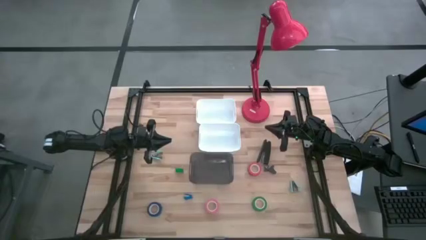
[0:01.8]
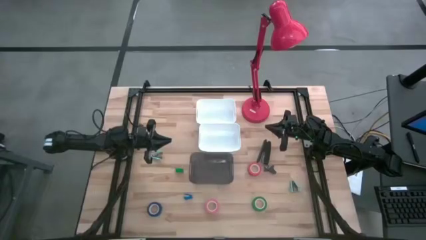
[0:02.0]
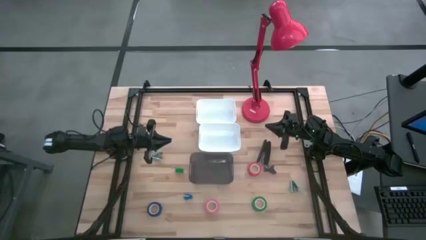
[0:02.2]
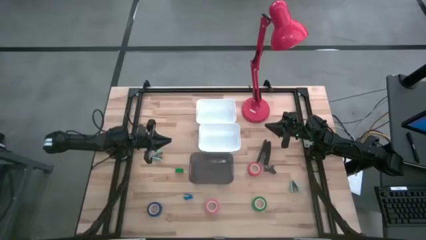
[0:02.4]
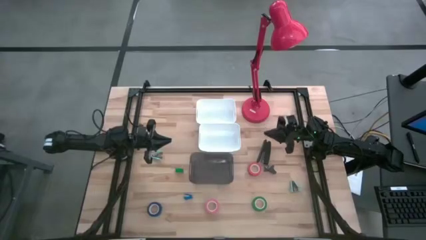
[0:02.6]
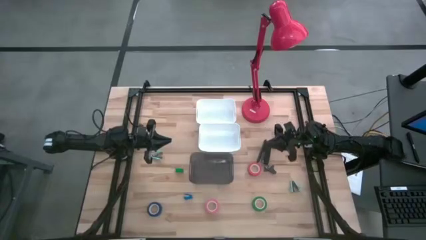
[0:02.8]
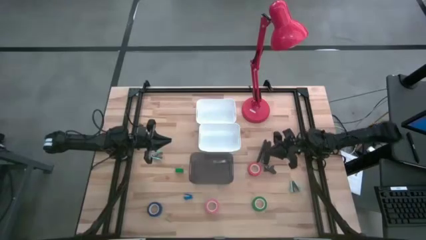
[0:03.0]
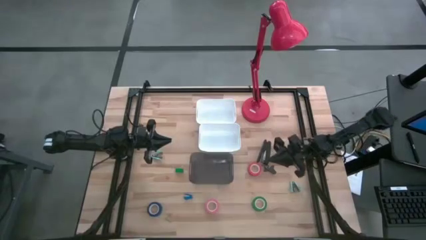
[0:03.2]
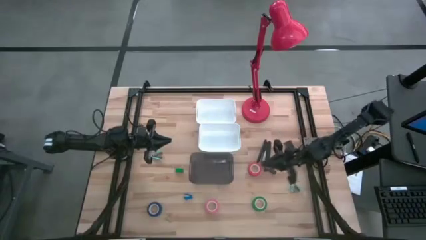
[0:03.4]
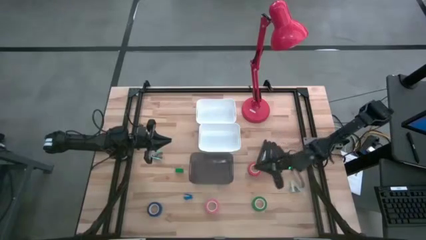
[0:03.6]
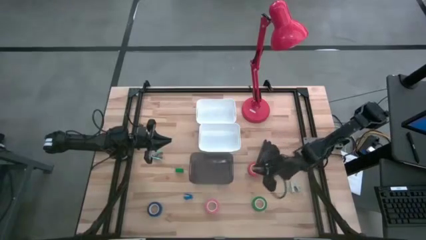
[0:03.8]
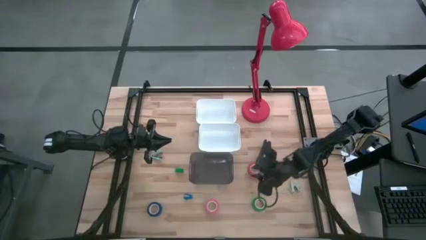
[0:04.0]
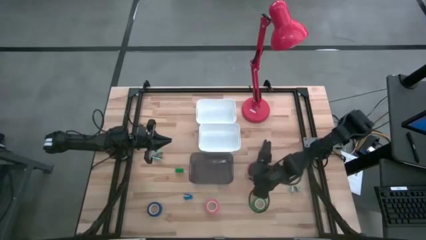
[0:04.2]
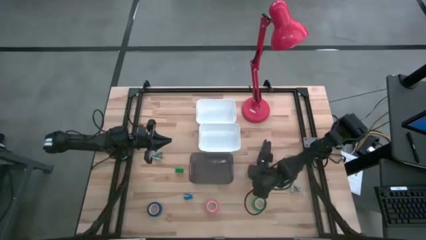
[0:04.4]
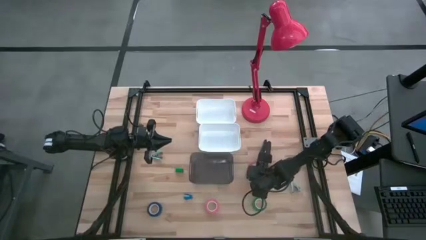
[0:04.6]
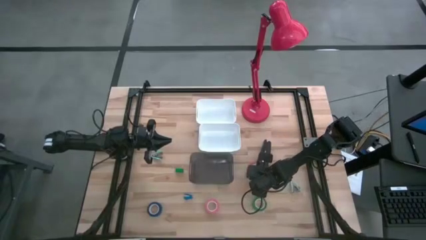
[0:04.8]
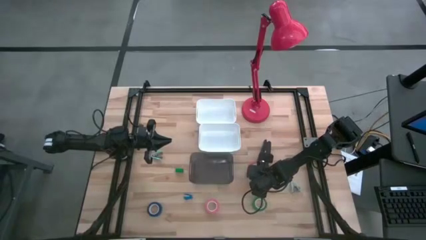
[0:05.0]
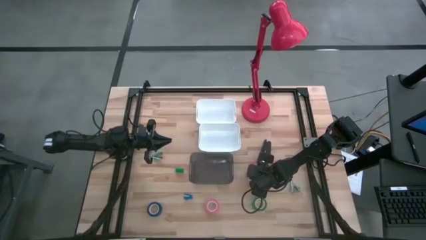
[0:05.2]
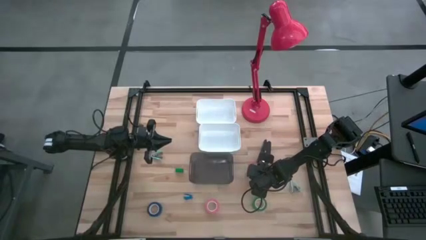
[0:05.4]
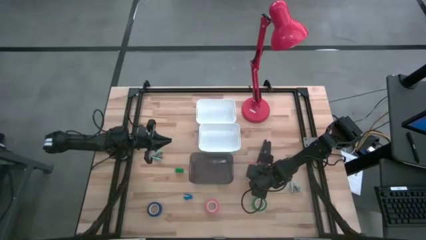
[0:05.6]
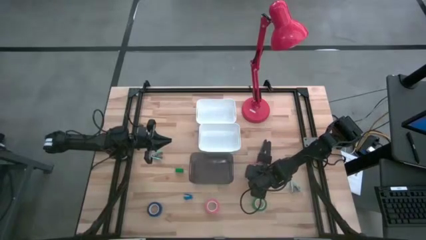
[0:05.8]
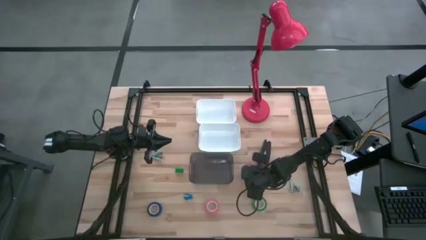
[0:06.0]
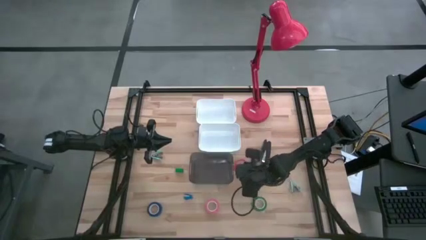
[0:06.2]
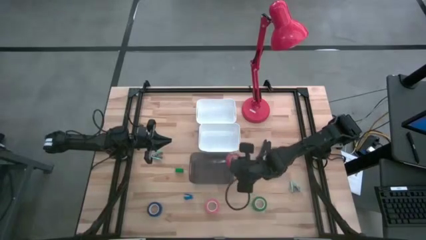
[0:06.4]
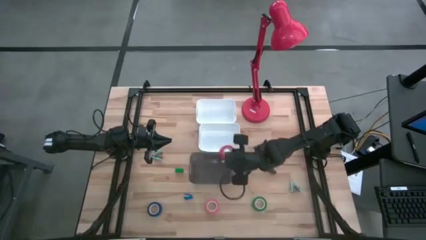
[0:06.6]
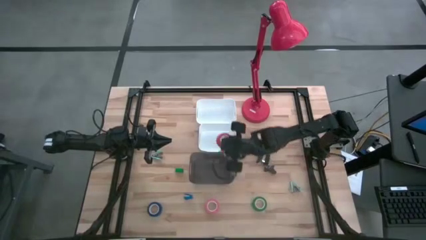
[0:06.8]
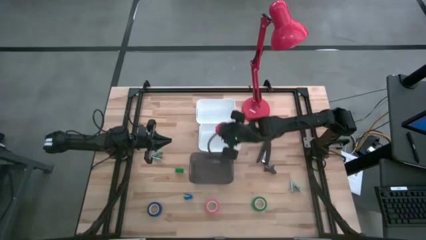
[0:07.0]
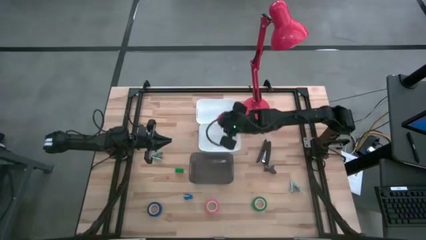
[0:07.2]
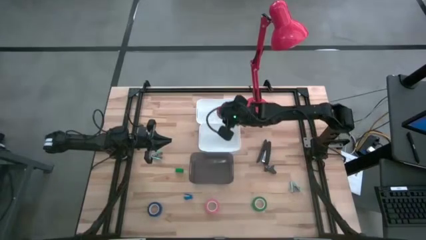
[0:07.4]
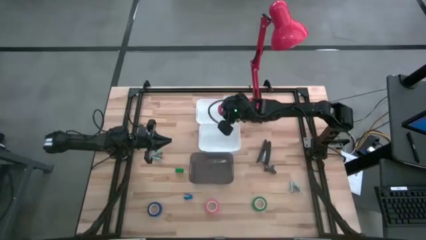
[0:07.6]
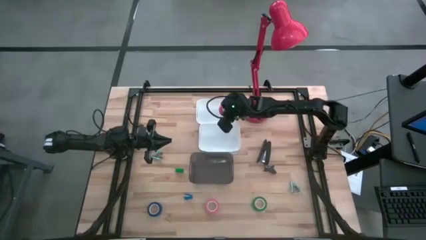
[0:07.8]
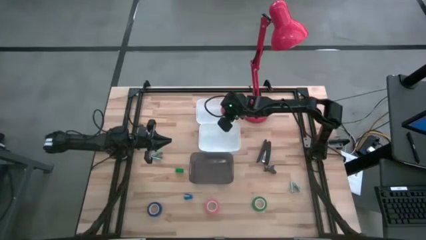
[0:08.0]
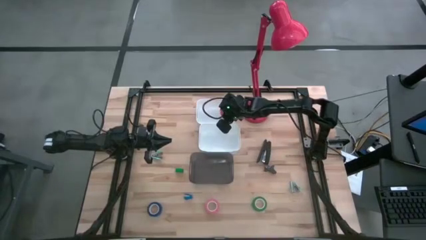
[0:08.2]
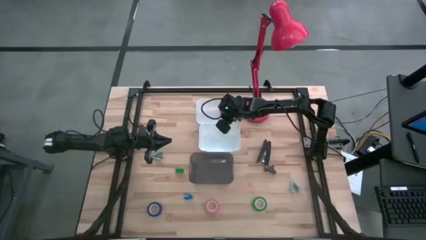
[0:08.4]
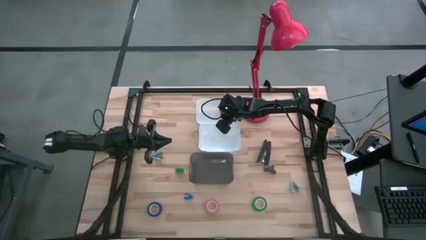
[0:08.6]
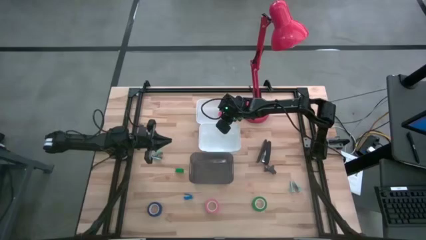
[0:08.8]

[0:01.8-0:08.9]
Task: Pick and place Stapler, Stapler remover, tape
Put the red tape into the top white bin

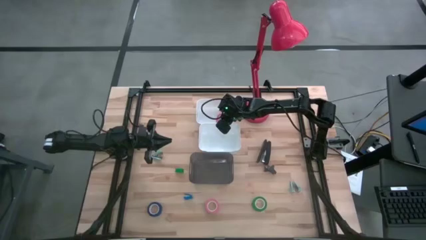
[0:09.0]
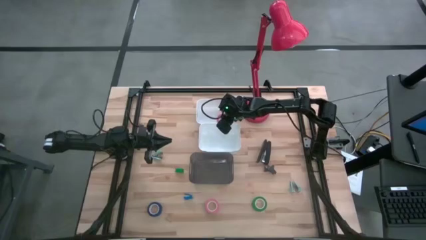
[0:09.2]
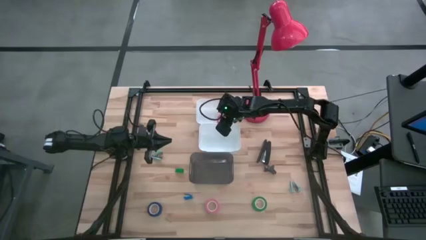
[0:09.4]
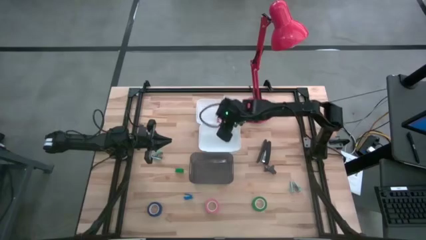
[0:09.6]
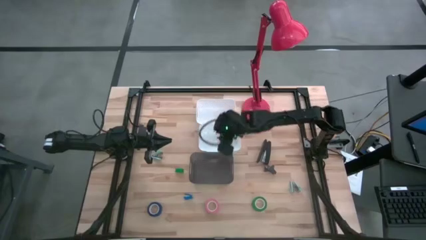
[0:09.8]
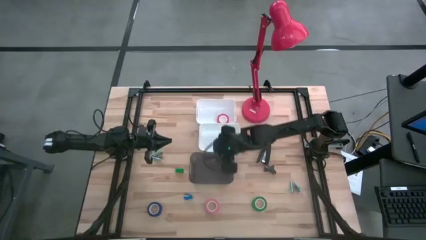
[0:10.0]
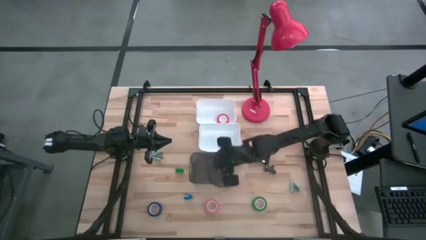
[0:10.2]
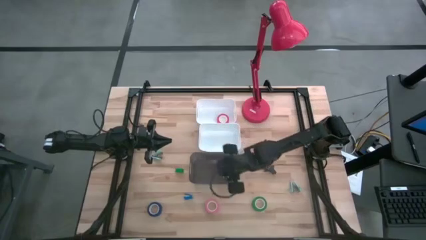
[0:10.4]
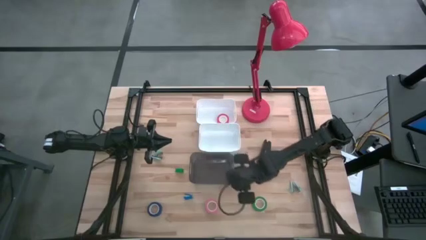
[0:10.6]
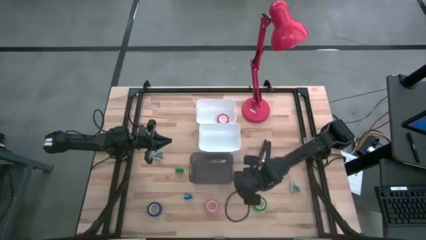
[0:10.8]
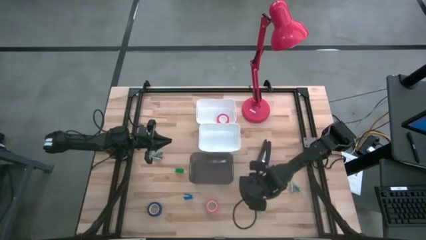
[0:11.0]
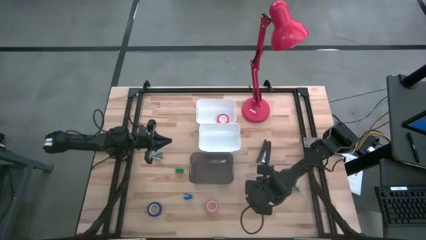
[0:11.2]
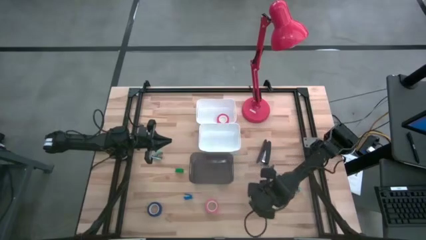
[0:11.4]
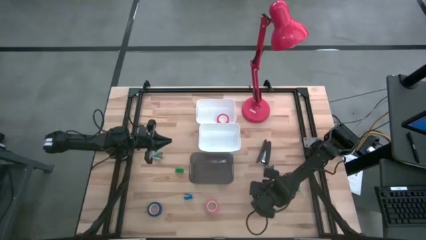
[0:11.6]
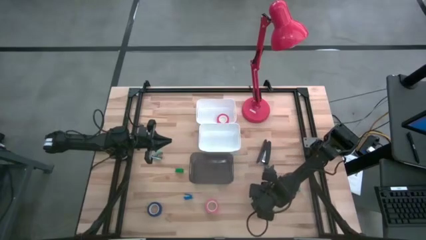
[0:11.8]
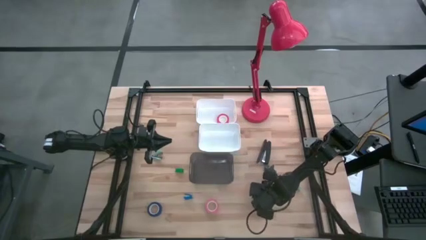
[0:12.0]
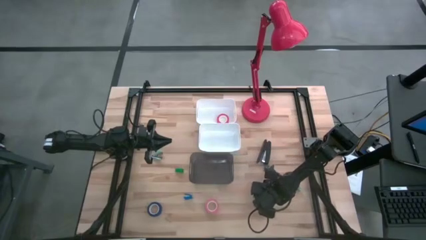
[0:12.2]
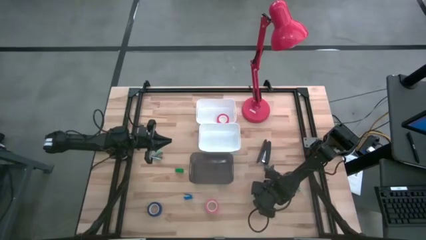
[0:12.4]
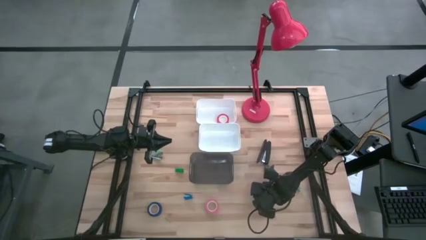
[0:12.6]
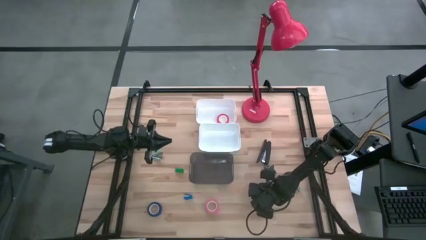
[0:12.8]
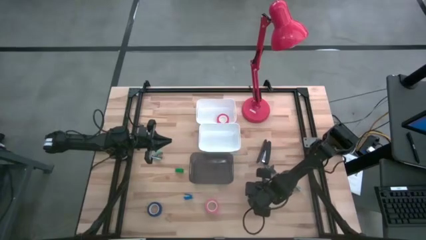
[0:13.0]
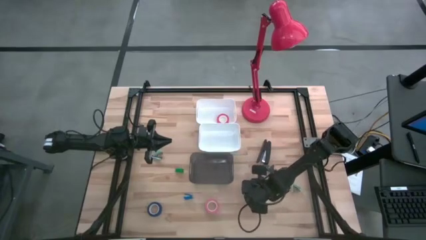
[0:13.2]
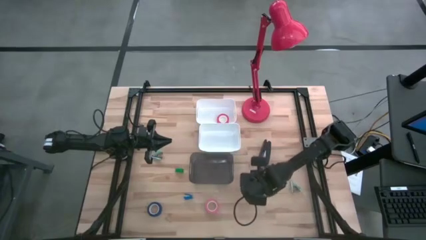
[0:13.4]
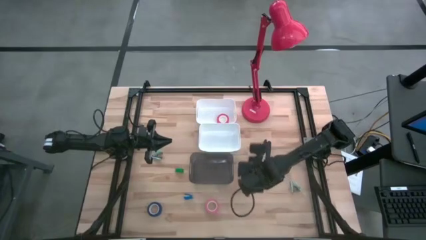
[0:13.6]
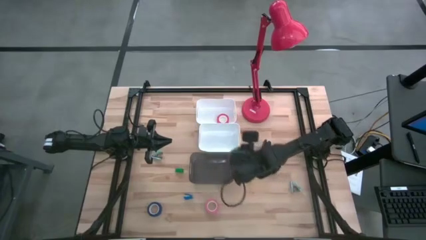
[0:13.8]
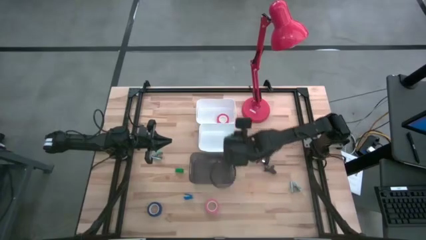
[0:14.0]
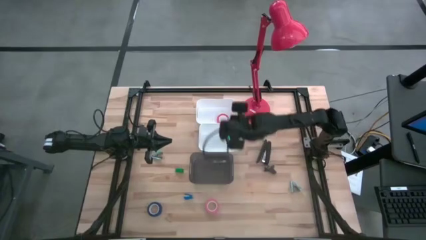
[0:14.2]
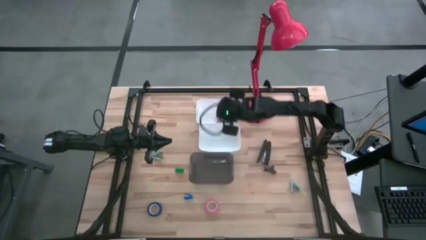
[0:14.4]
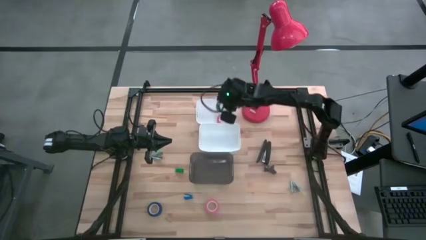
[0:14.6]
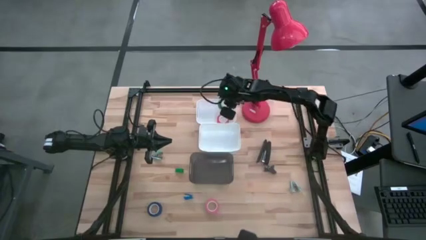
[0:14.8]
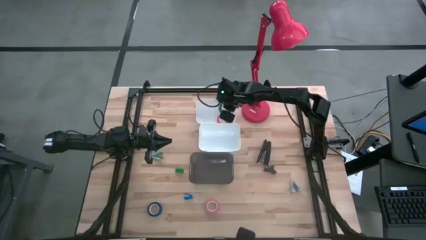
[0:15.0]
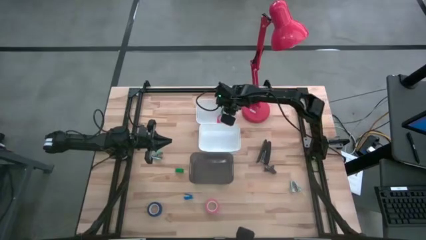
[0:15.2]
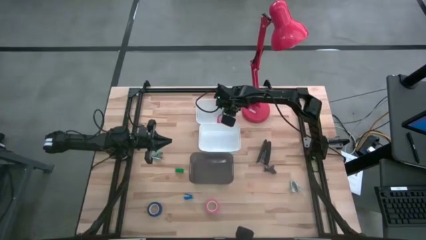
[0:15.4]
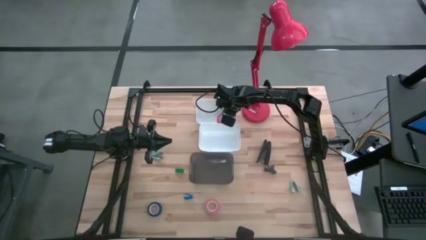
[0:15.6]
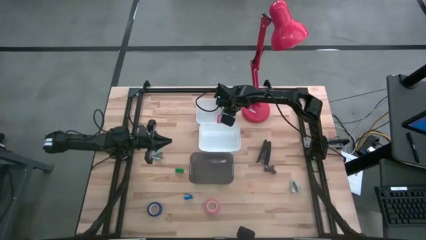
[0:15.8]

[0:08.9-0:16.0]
Put the green tape into the top white bin

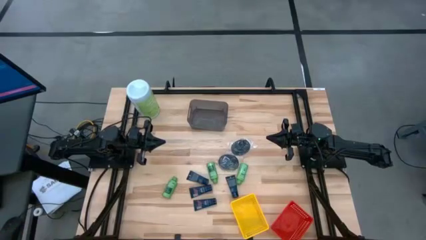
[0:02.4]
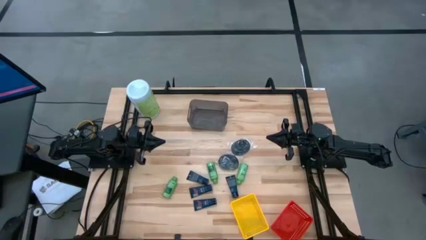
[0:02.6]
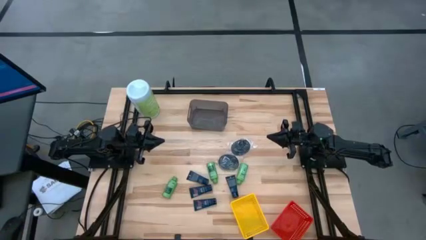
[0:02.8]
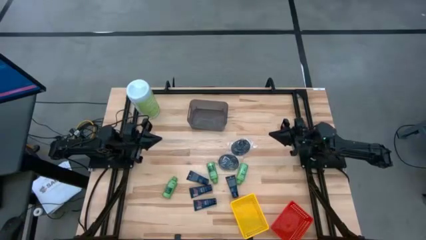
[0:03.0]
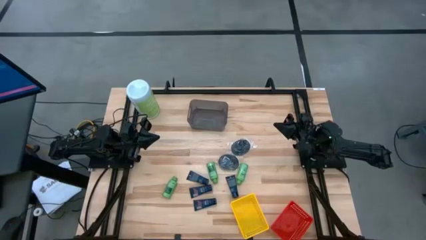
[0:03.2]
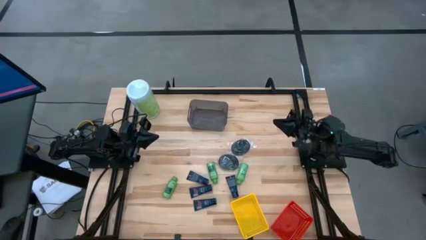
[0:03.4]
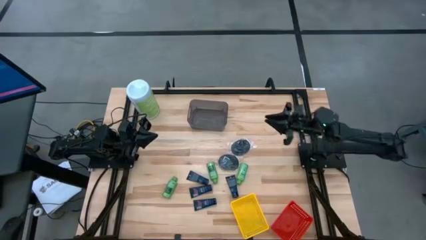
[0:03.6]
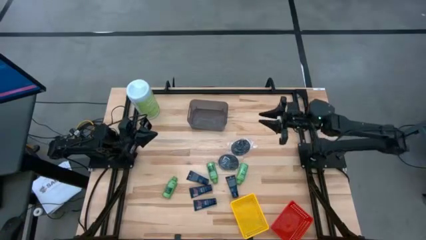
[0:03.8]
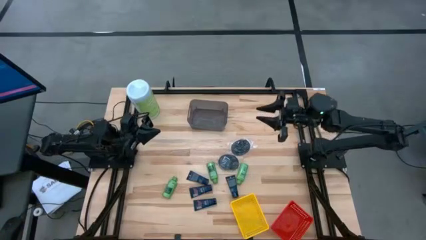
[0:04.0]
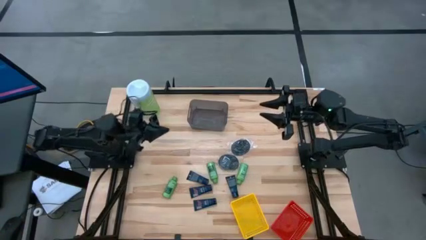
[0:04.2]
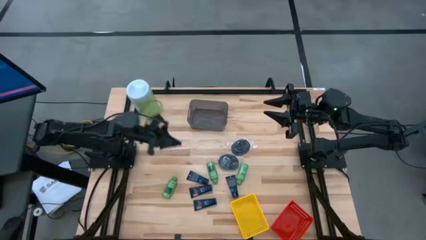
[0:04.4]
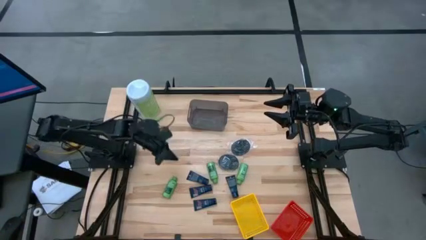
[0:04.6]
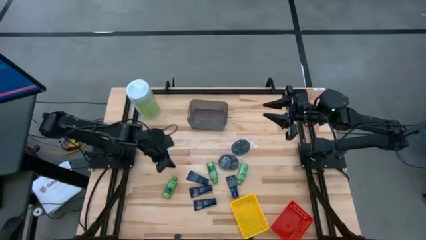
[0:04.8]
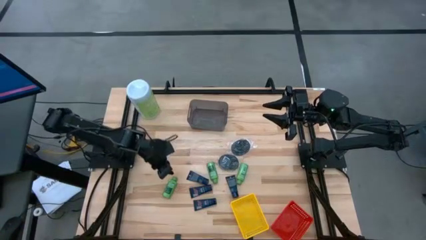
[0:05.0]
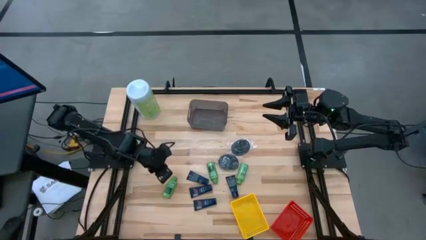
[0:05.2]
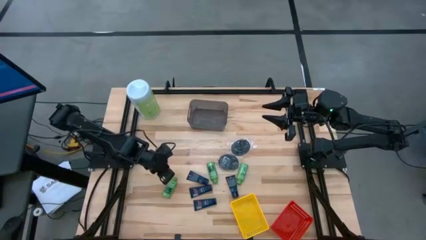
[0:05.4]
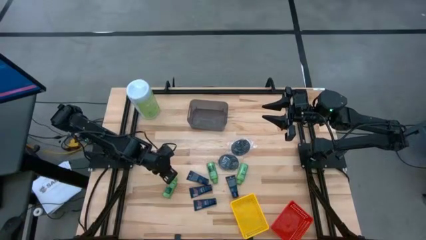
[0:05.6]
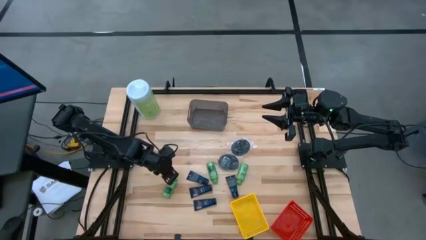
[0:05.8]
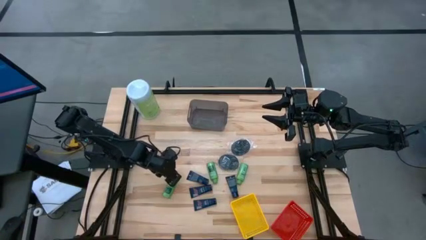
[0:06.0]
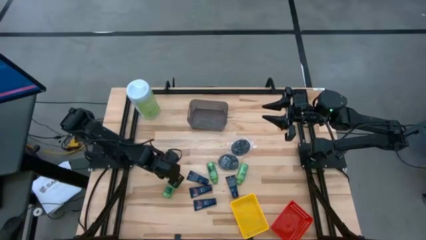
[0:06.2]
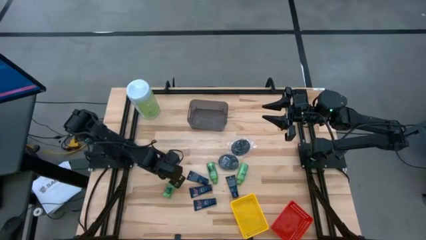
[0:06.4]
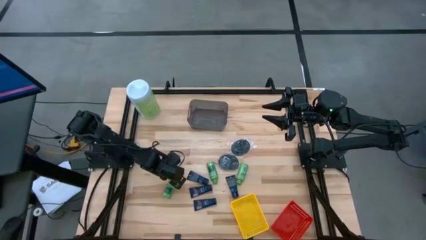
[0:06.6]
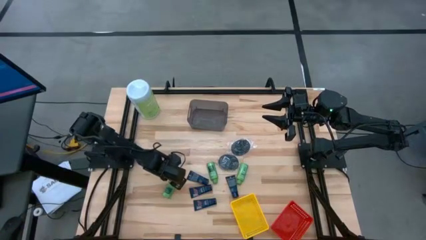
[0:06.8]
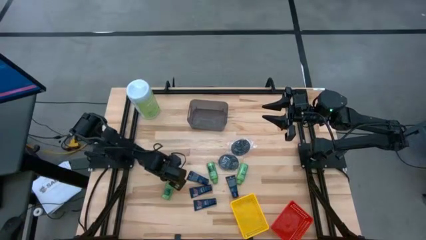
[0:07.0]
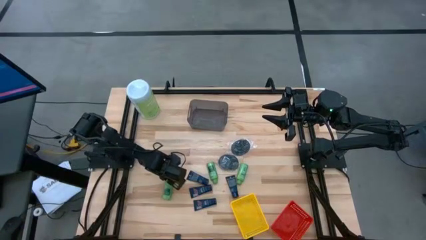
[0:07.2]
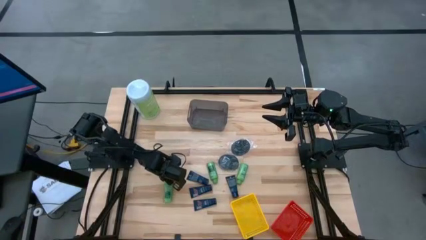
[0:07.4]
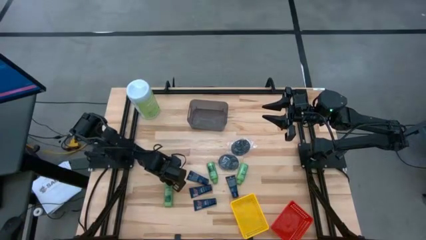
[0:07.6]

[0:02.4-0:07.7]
Task: Pick & Place Travel size toiletries
Put the green shampoo bottle on the red bin
